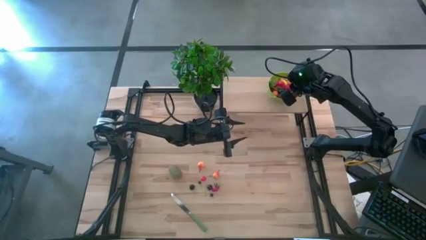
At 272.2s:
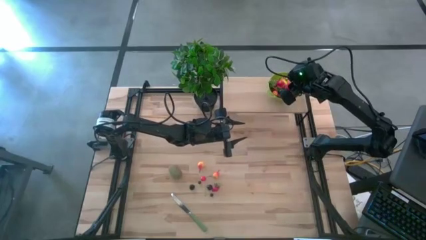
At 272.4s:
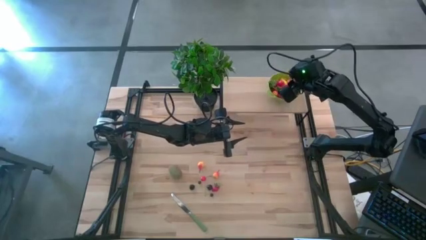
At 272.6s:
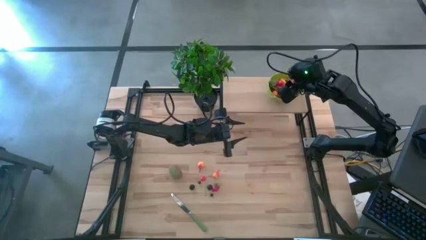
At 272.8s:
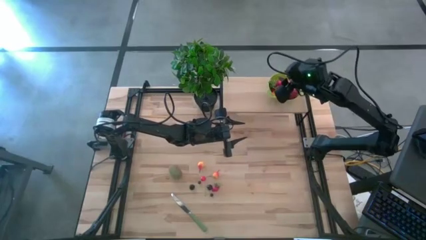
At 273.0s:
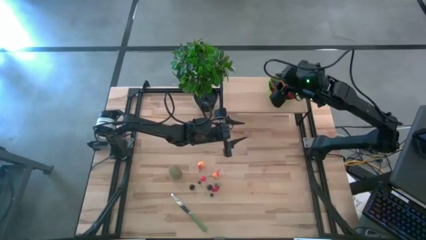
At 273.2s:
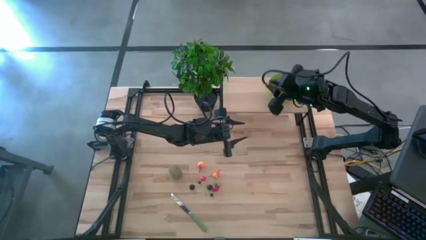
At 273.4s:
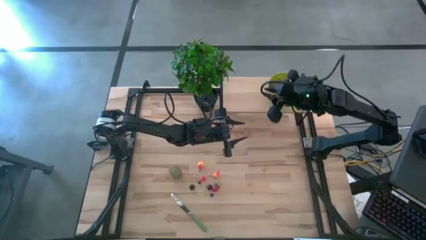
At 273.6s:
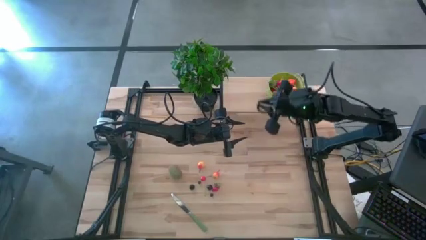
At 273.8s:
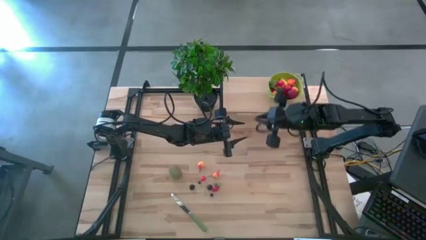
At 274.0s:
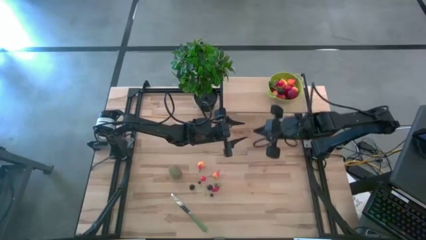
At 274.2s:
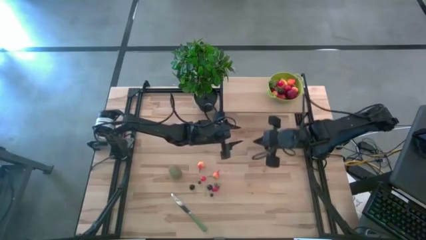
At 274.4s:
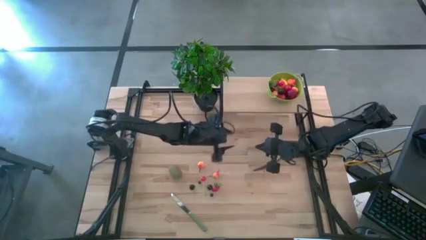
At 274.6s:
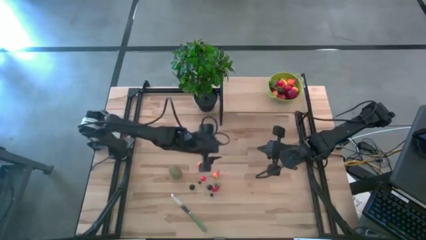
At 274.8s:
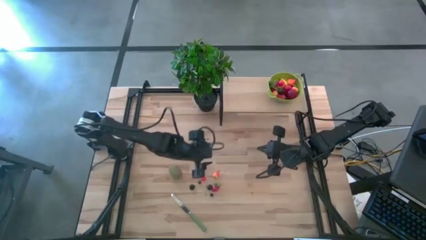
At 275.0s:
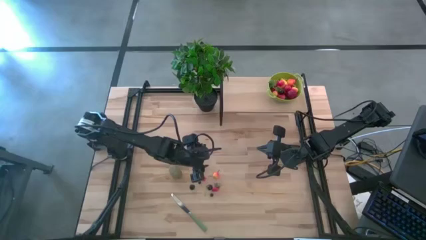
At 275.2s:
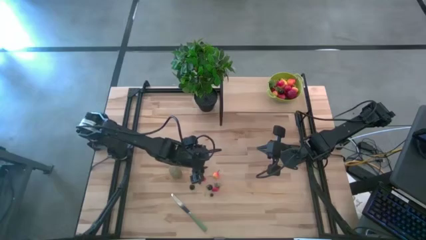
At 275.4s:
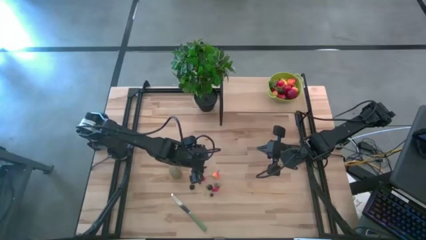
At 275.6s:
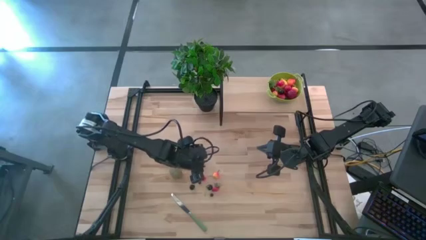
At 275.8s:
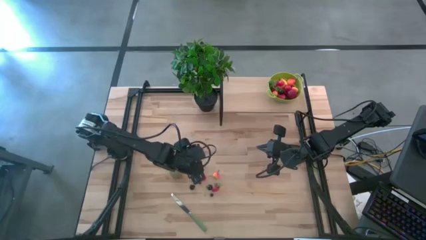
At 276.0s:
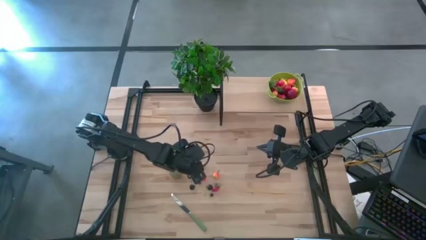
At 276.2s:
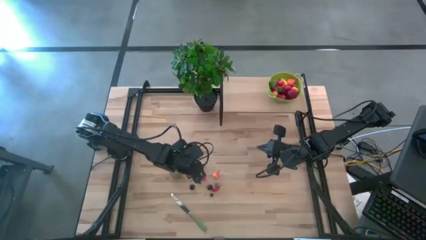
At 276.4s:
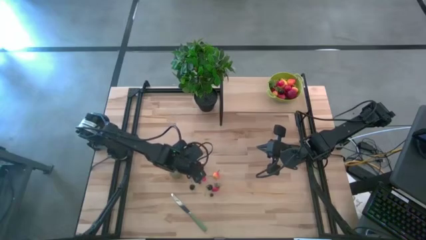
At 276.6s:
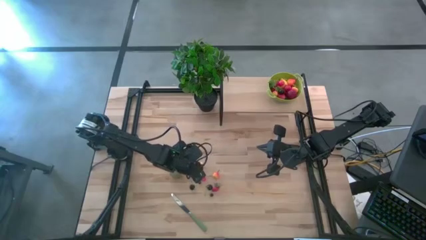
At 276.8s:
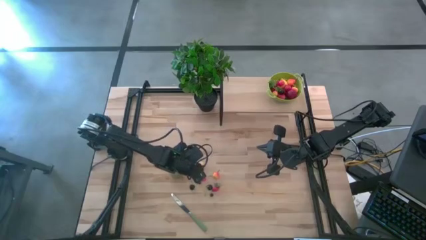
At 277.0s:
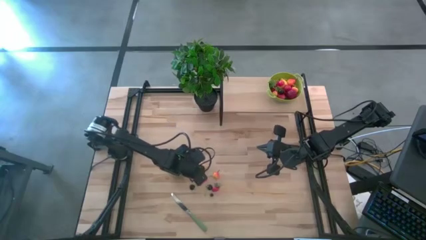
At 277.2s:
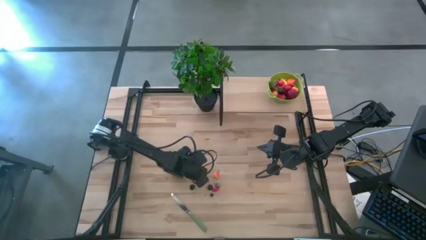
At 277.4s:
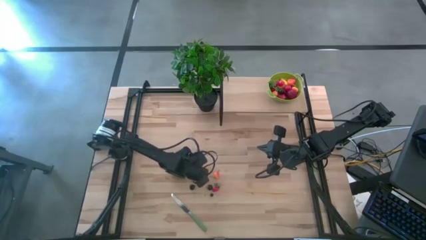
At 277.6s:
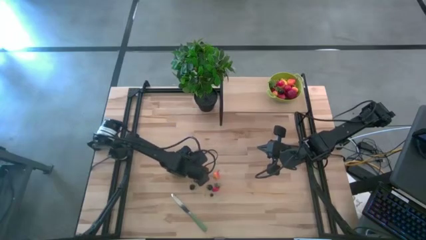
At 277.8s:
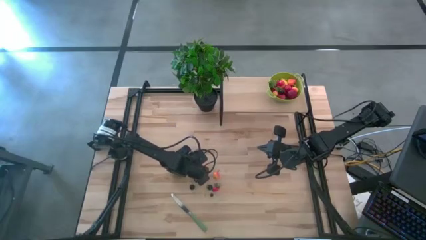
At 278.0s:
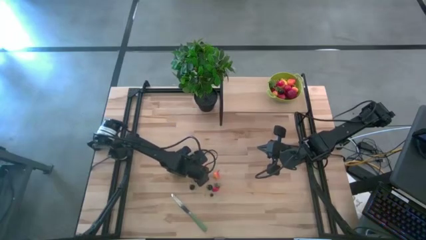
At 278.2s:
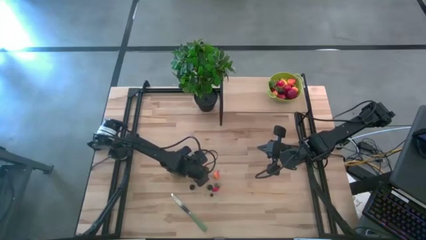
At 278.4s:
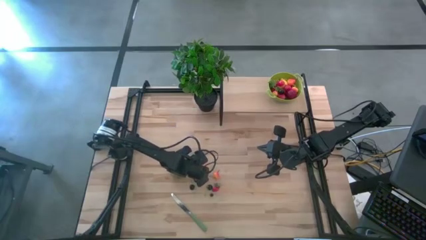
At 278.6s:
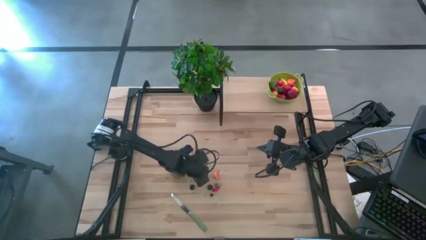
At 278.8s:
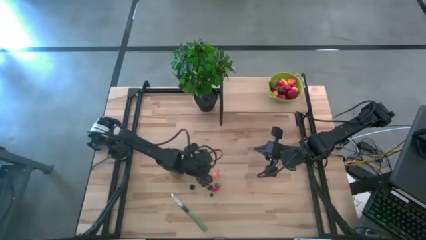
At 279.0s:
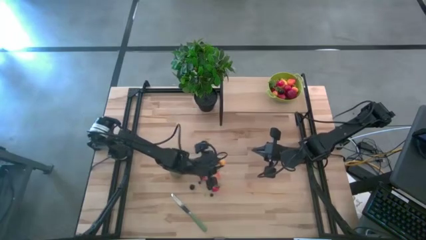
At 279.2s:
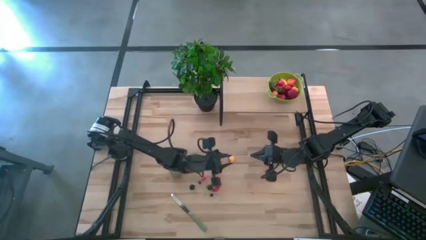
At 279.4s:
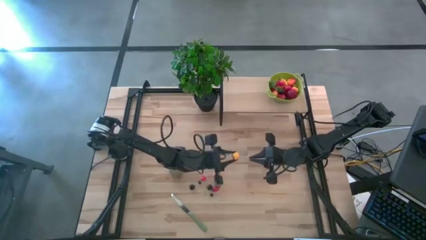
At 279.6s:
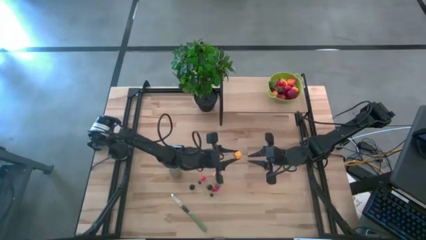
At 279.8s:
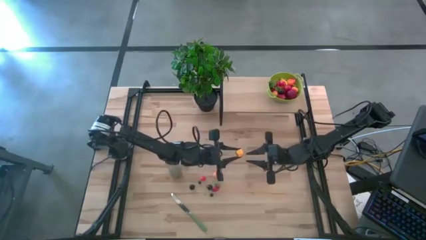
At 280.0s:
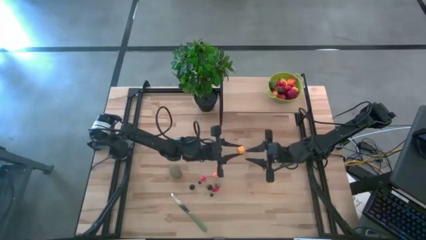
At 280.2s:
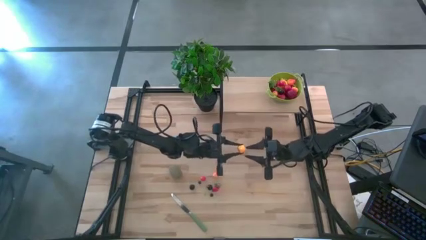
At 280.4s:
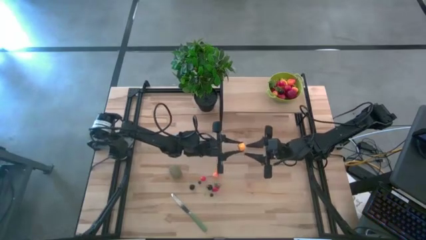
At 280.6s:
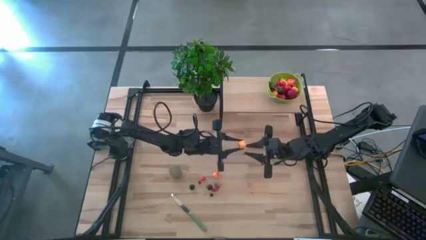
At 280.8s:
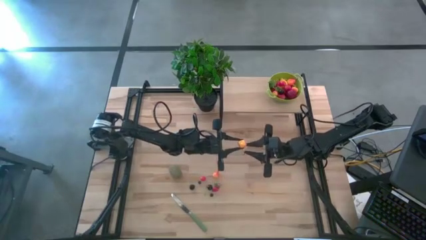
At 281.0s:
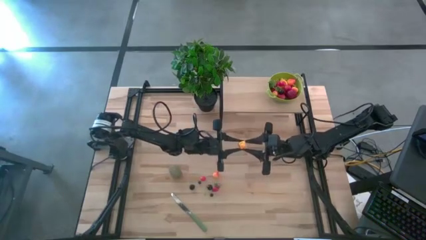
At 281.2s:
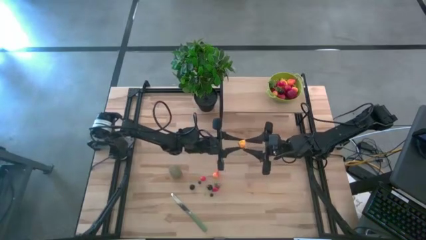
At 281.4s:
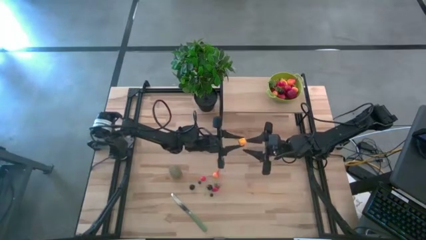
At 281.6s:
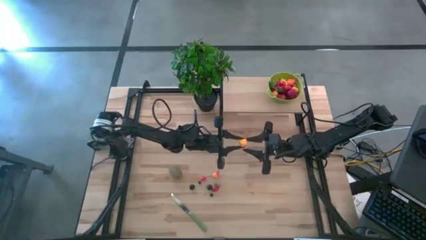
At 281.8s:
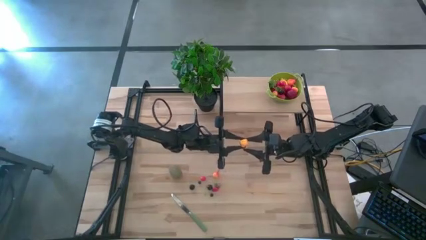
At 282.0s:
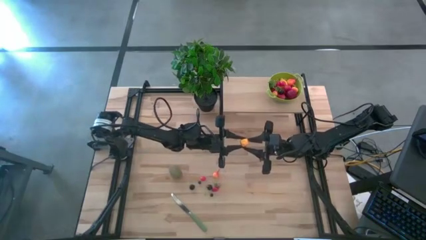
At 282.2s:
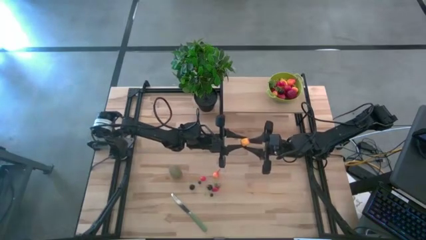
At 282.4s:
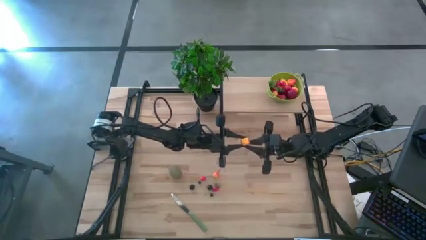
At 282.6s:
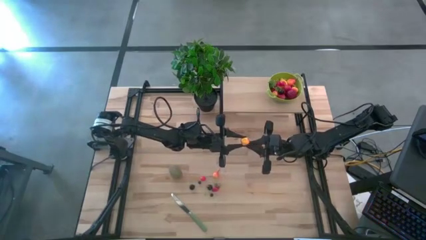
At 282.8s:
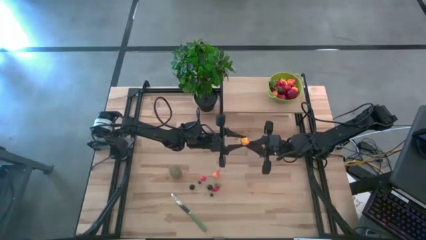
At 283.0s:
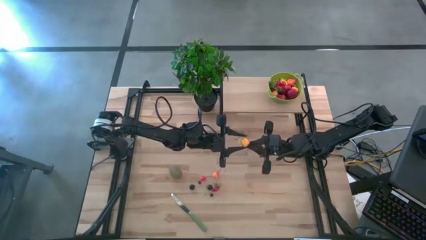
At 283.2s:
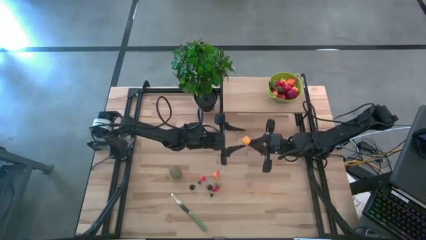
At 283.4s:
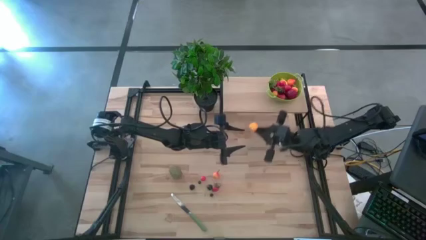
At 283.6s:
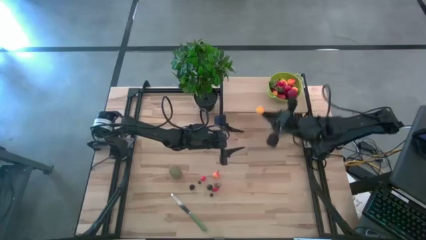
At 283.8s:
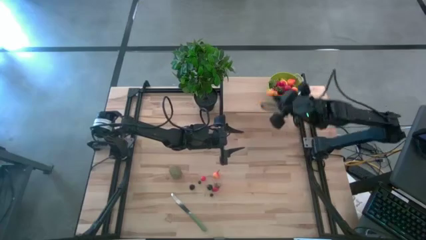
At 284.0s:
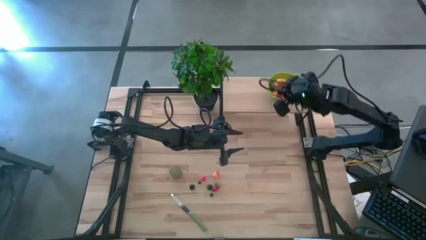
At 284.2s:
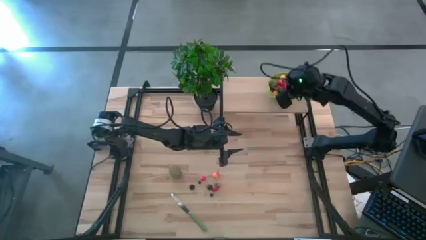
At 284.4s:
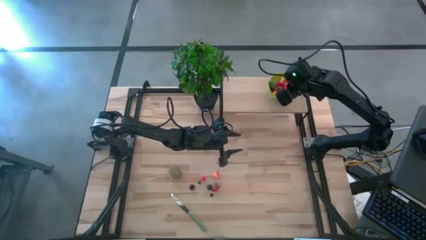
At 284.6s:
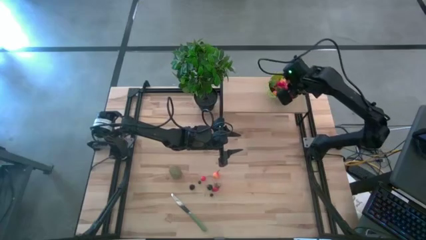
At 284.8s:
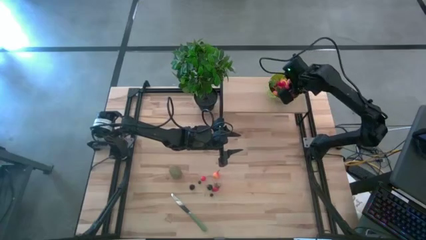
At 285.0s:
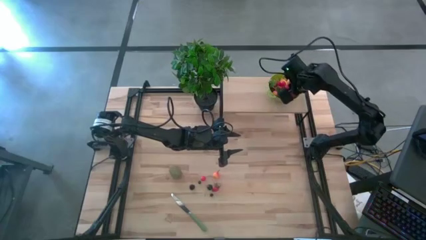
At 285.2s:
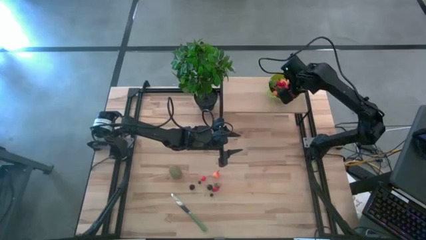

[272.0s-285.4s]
Task: Pick & Place Fruit
Put the pear into the green strainer bowl on the shelf

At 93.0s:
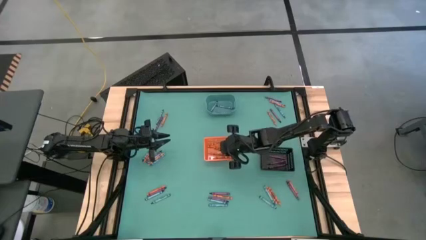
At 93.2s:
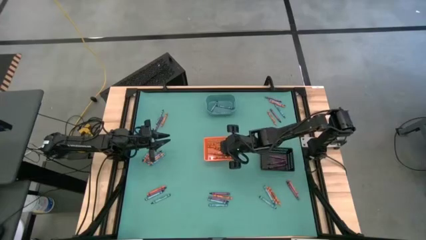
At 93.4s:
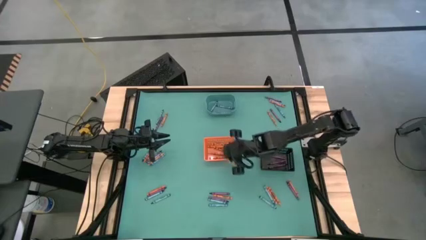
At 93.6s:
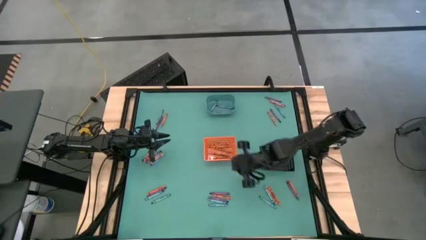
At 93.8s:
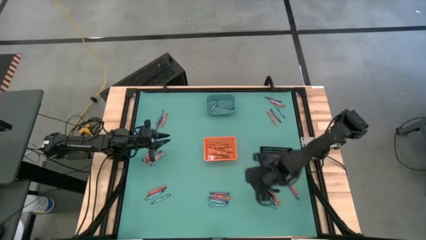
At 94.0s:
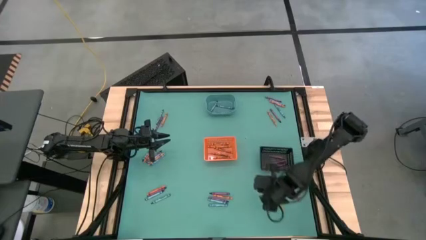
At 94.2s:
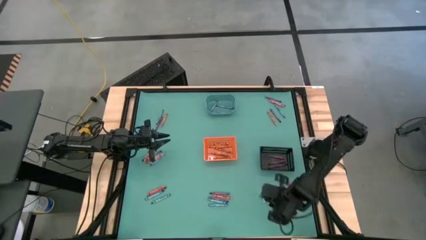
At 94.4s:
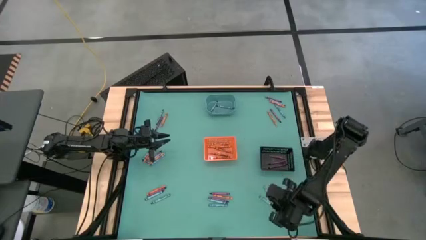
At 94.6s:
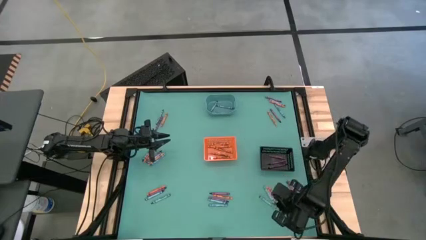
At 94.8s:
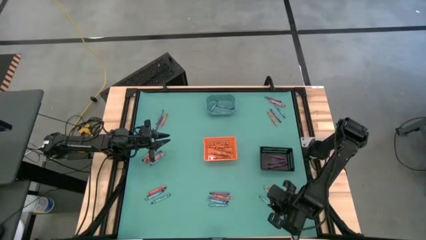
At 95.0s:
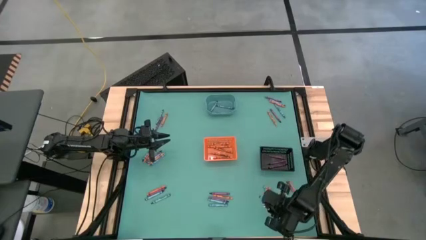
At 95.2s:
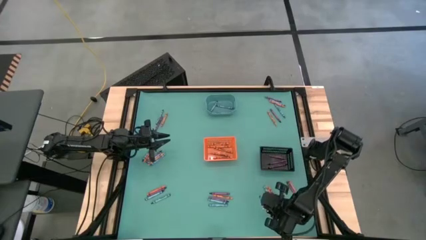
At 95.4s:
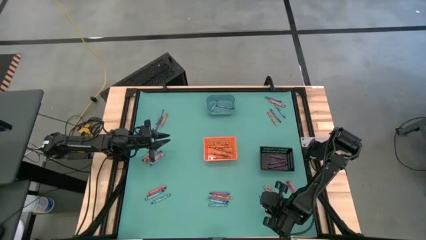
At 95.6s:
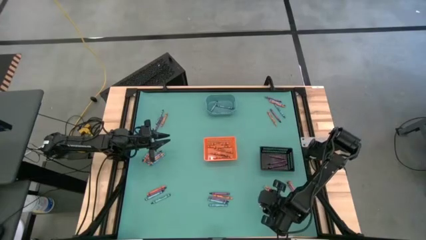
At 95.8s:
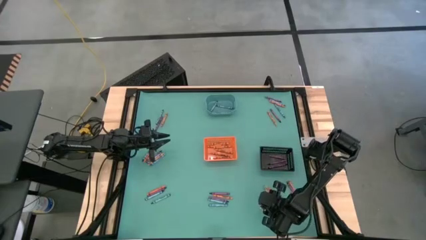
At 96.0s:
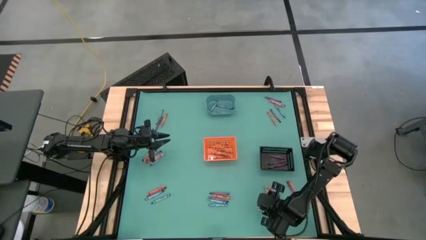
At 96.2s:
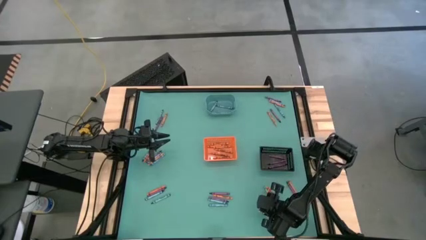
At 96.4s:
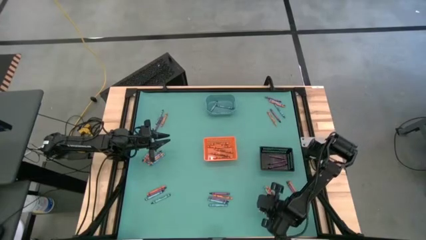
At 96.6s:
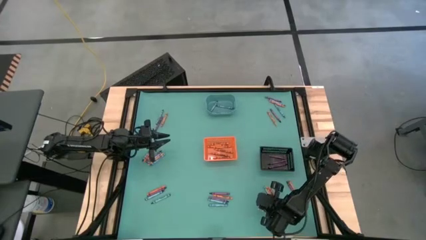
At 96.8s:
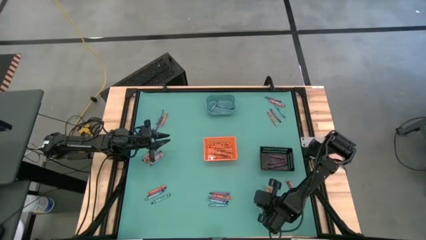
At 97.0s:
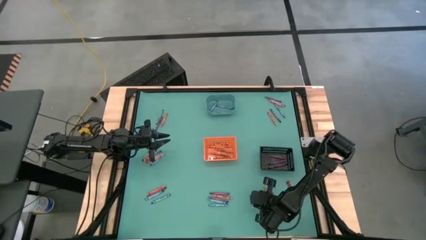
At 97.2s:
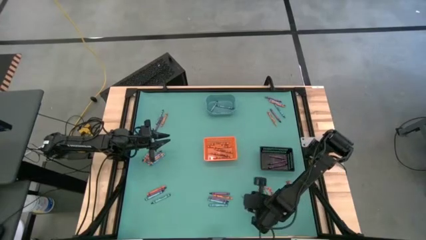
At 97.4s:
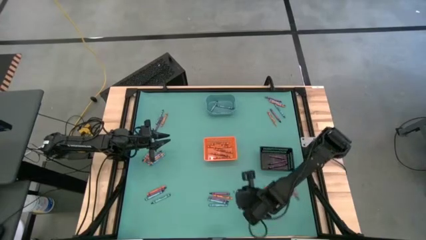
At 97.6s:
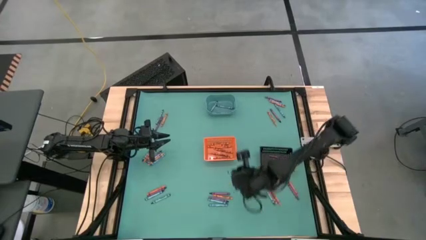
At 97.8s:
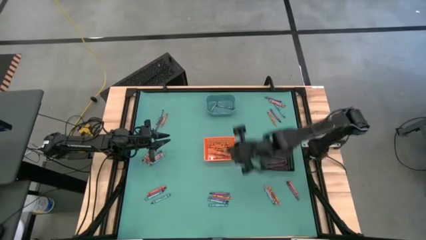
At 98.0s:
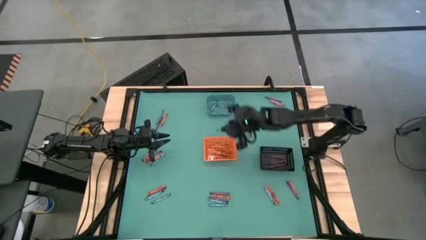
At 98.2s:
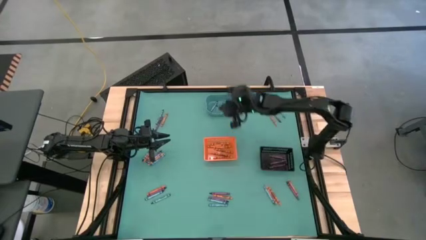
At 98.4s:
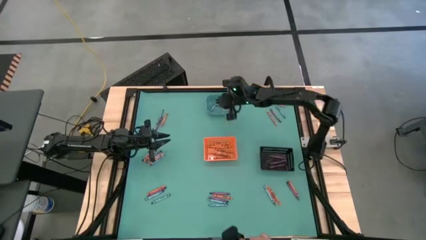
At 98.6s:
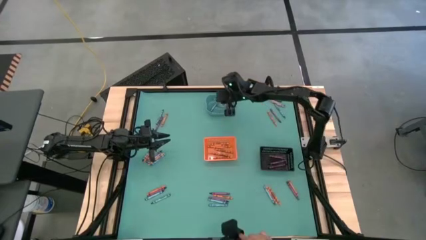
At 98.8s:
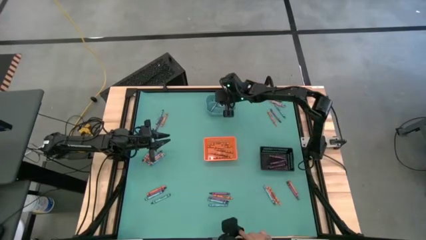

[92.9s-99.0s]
Task: Sort crayons
Put the blue crayon into the blue bin
